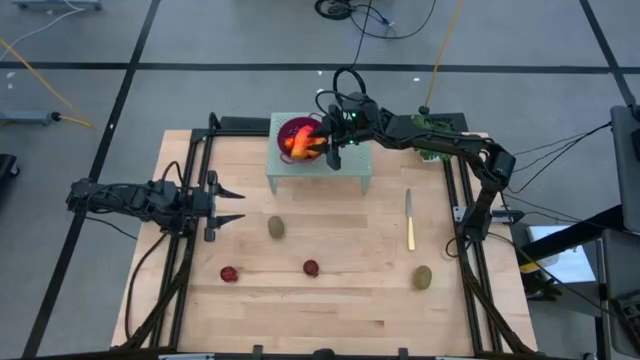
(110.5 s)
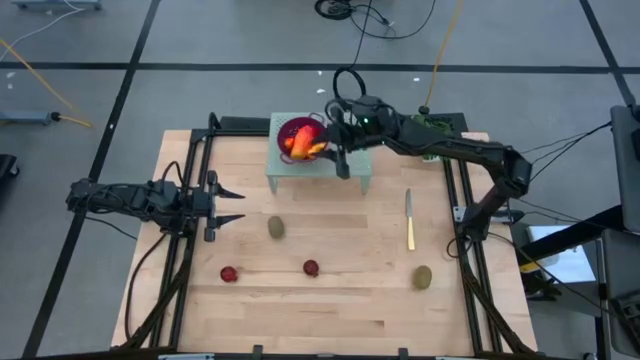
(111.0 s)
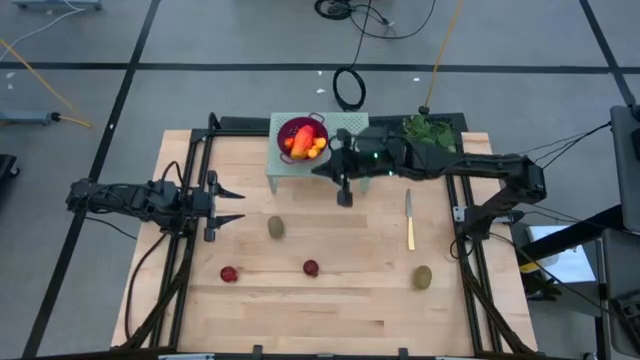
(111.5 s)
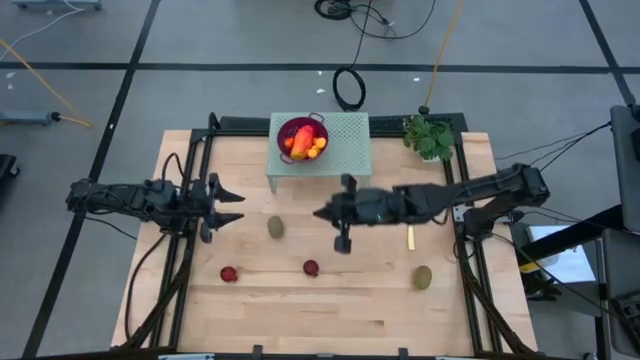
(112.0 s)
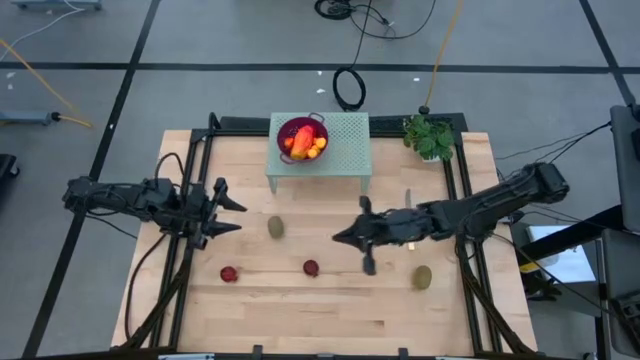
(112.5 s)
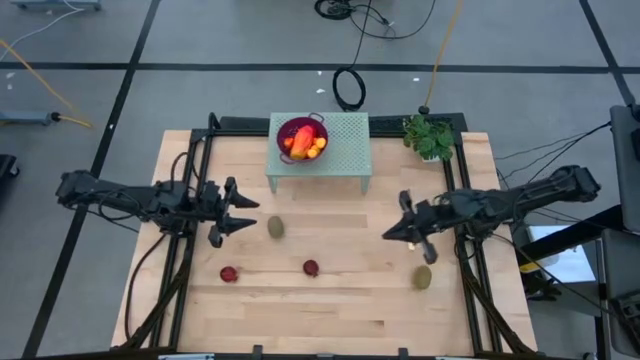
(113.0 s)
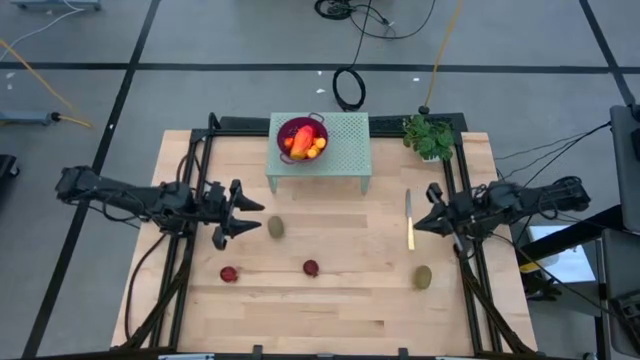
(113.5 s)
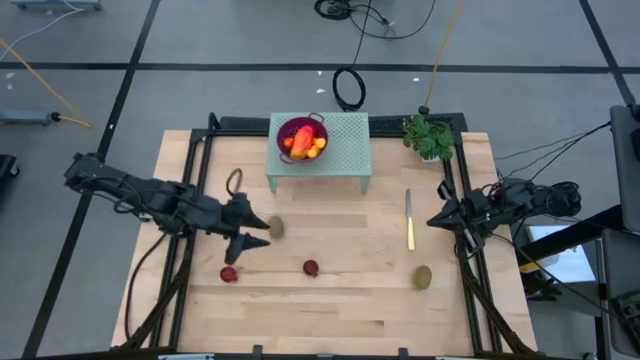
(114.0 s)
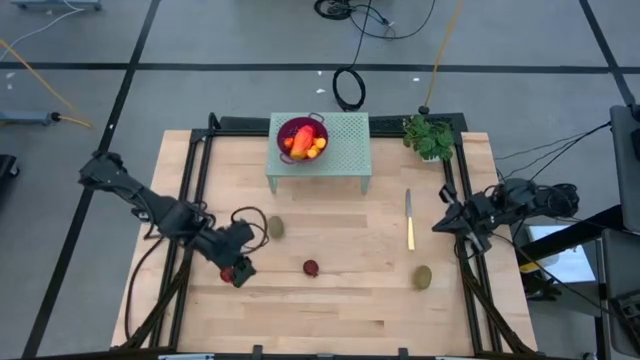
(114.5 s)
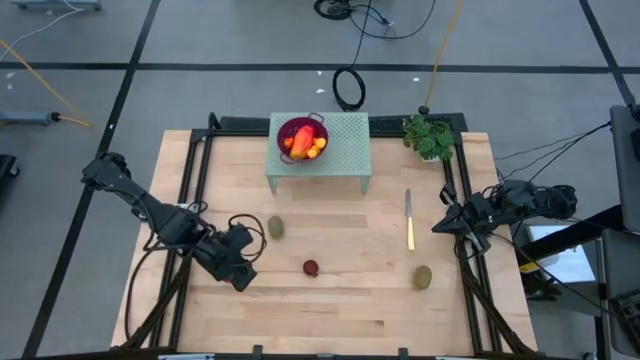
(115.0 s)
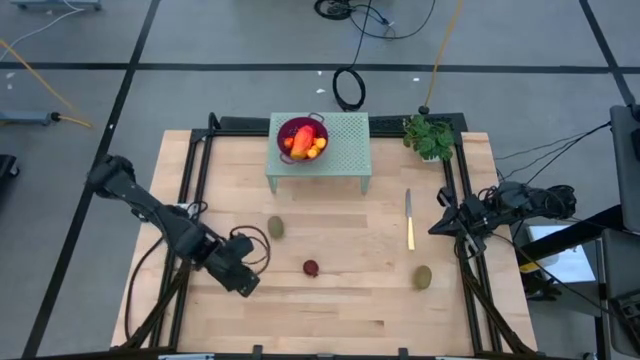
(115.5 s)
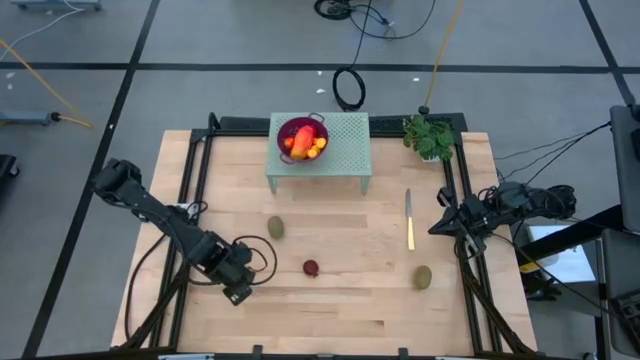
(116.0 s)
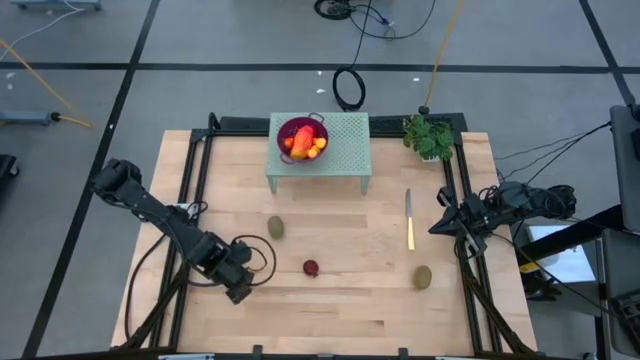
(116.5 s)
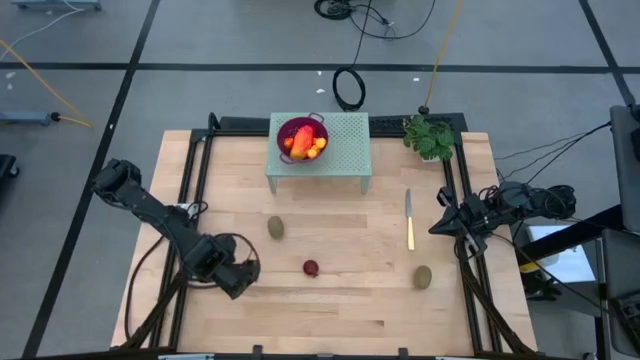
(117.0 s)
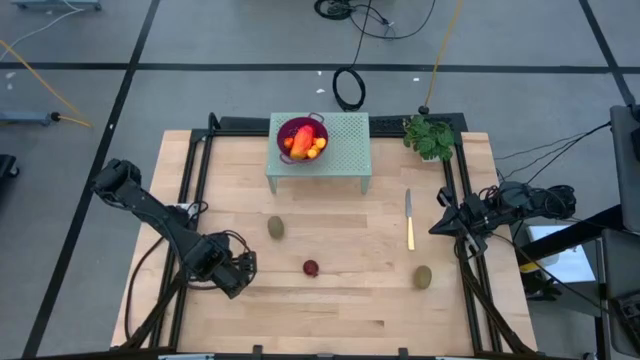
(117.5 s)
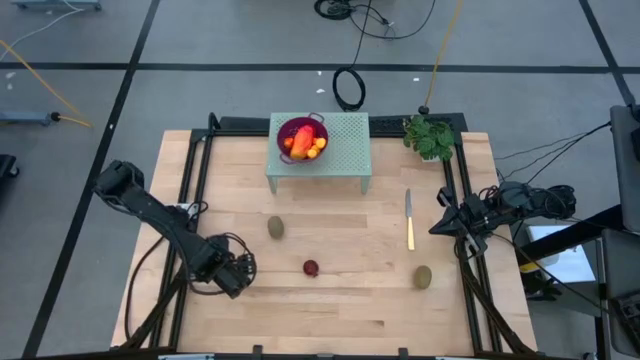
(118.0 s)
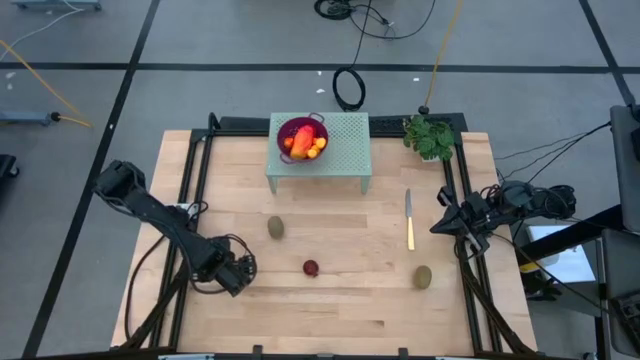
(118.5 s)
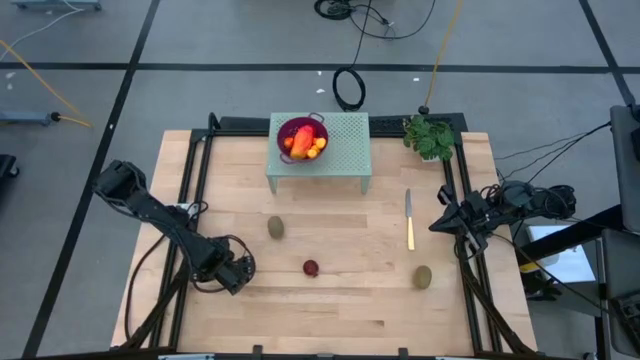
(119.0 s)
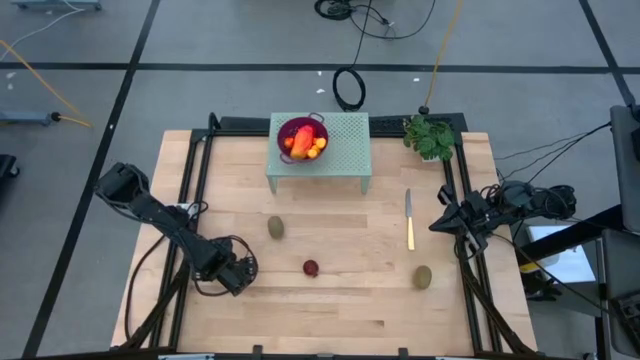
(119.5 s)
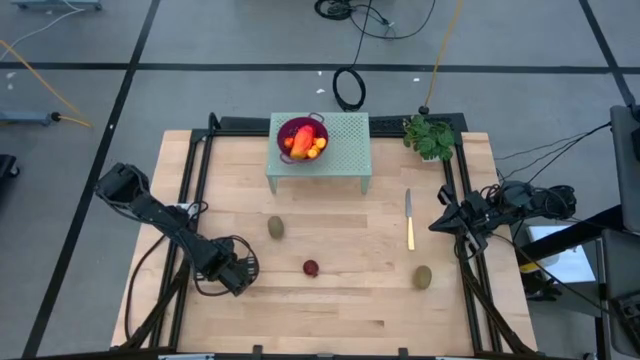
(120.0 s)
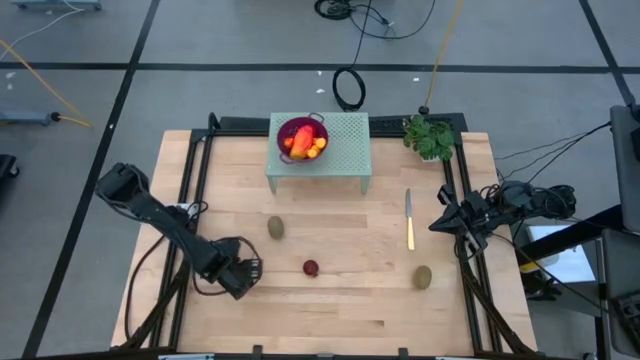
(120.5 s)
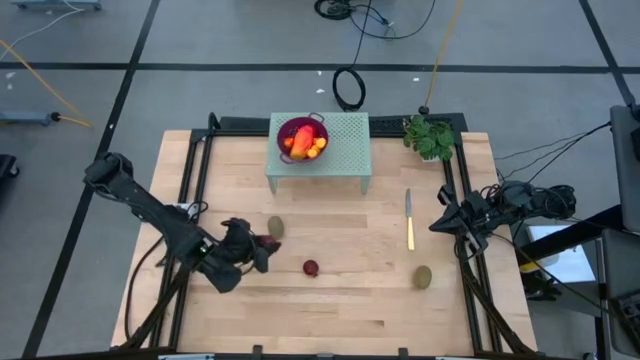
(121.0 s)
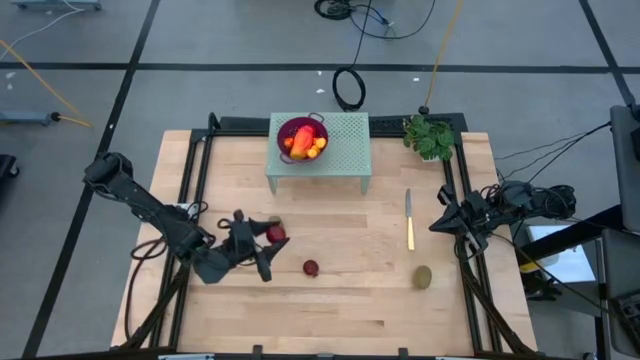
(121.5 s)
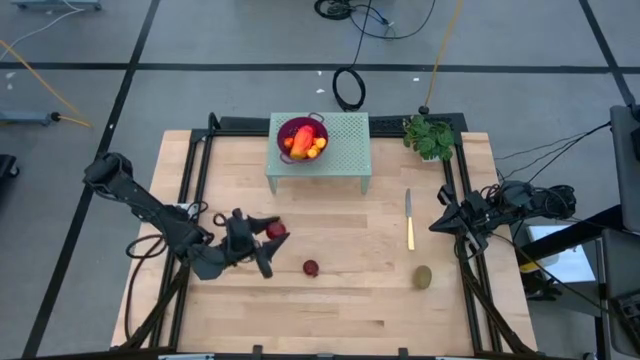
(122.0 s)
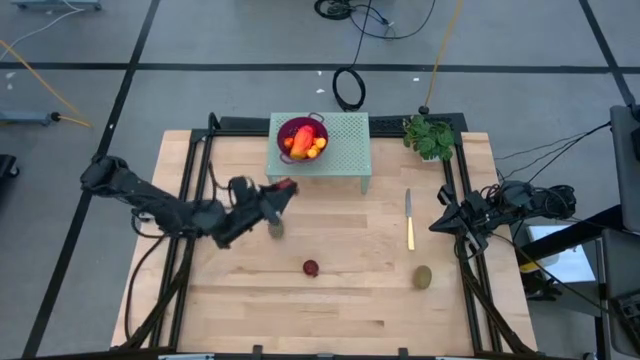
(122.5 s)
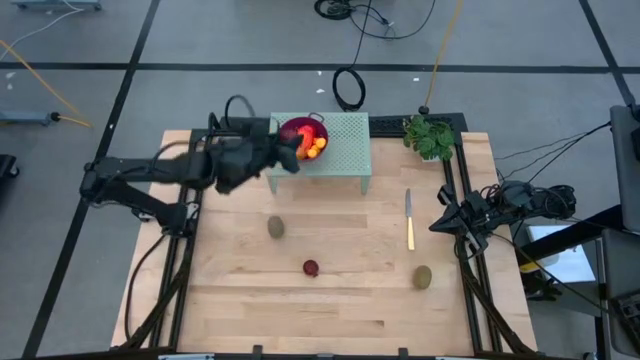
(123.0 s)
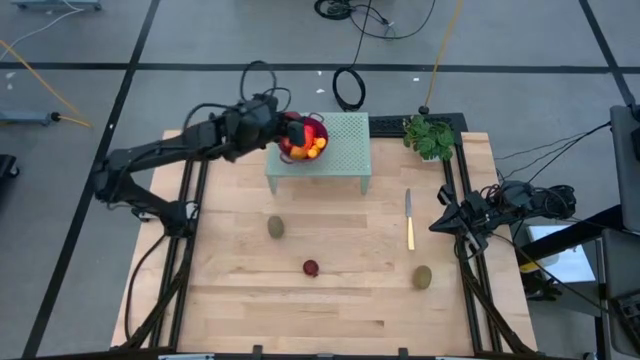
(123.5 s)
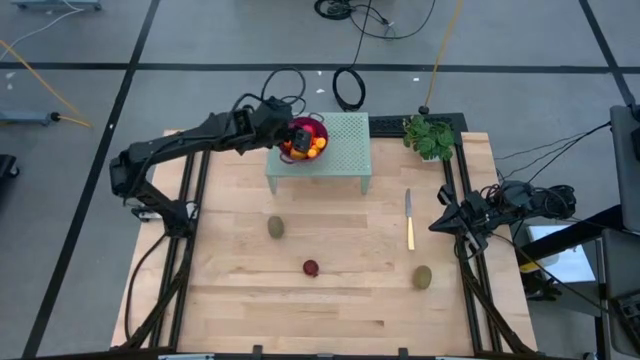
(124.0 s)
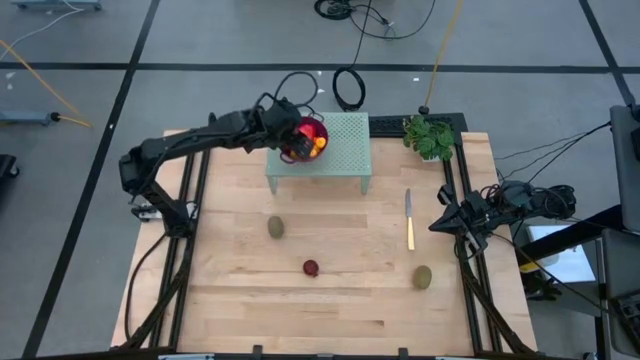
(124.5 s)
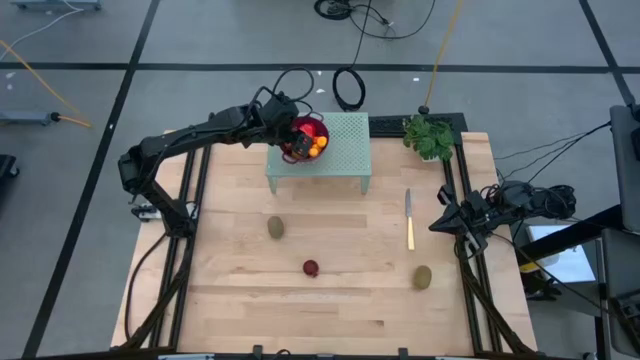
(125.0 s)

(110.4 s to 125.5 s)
Task: Pick & Place Fruit
Put the left pomegranate into the violet strainer bowl on the shelf

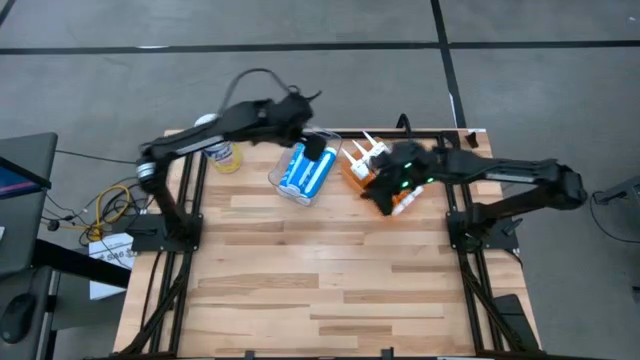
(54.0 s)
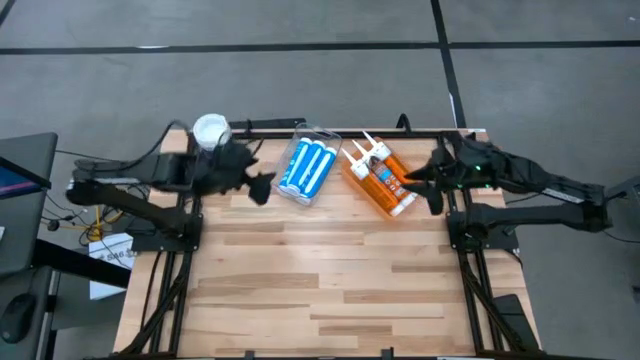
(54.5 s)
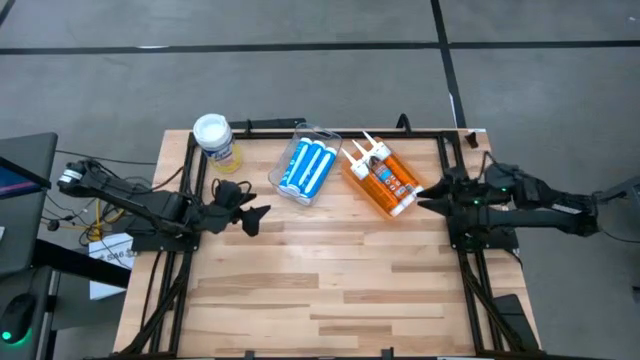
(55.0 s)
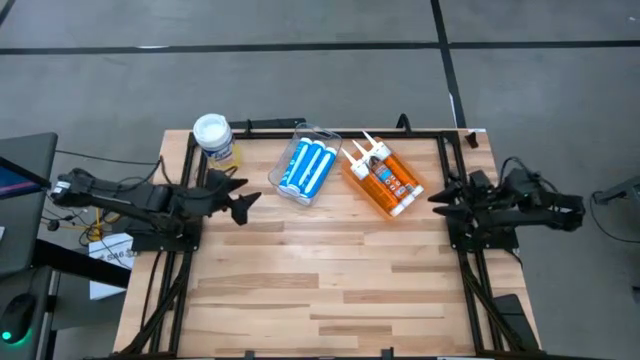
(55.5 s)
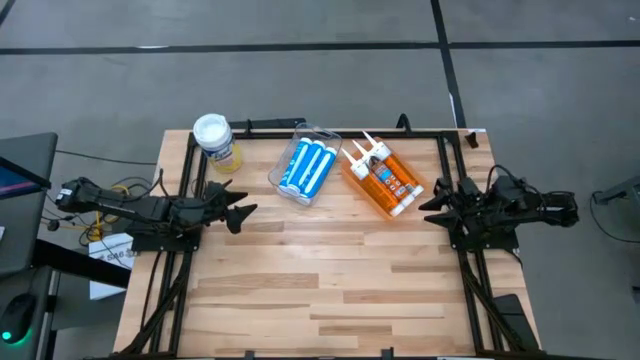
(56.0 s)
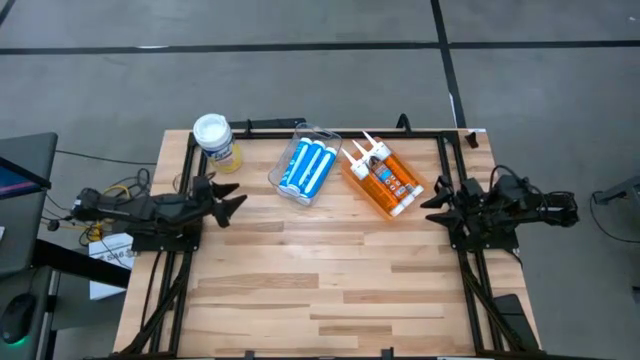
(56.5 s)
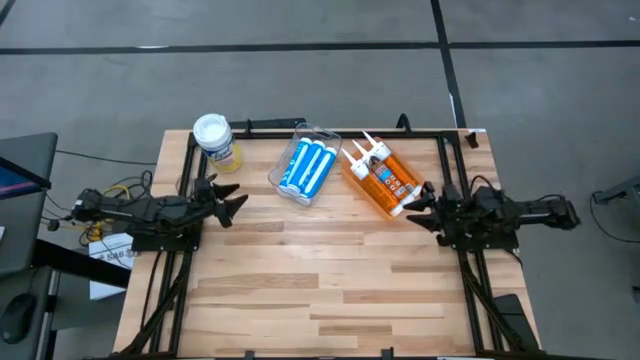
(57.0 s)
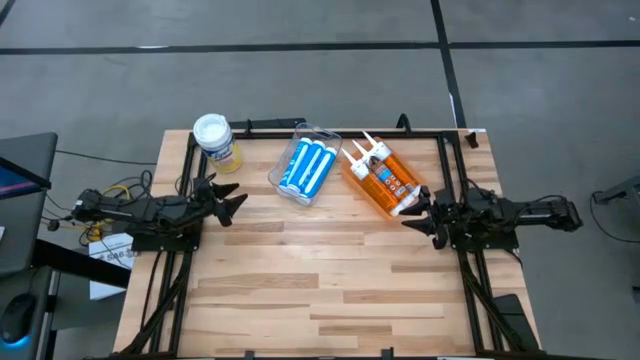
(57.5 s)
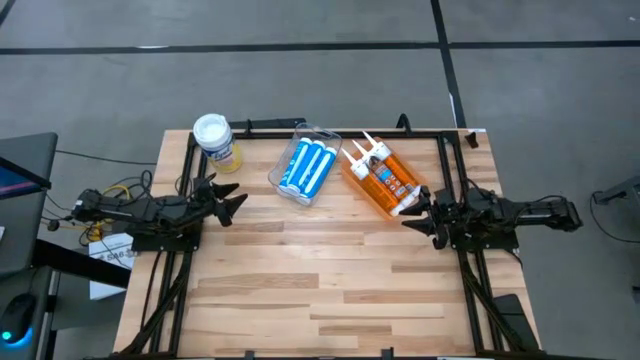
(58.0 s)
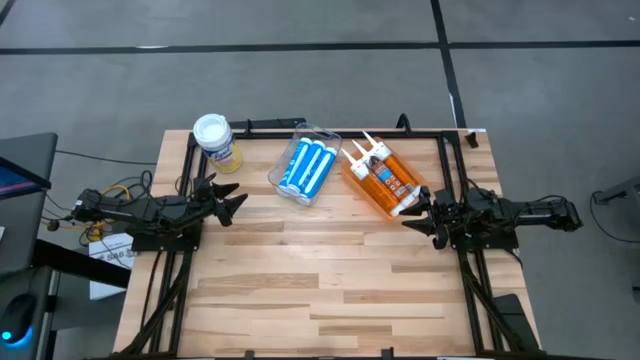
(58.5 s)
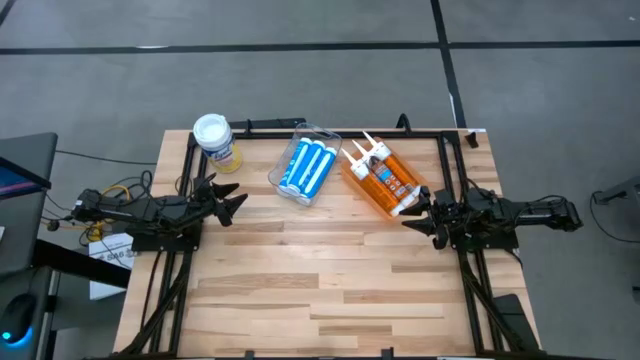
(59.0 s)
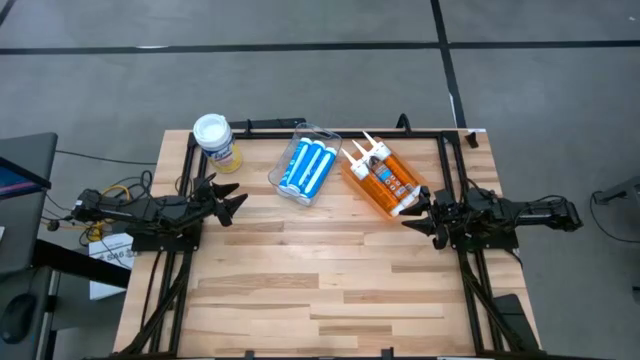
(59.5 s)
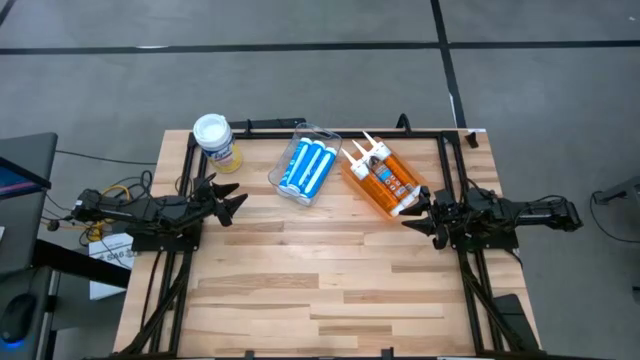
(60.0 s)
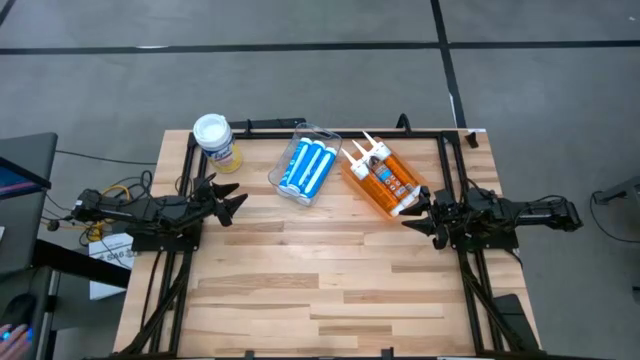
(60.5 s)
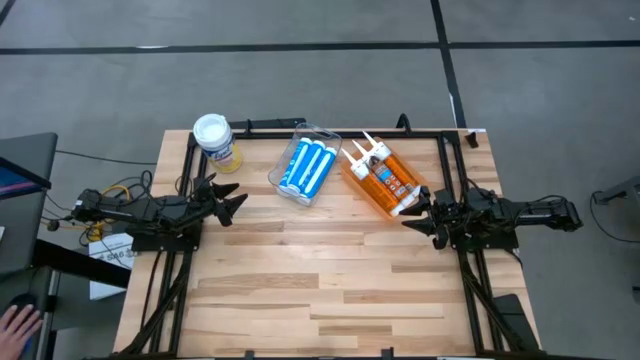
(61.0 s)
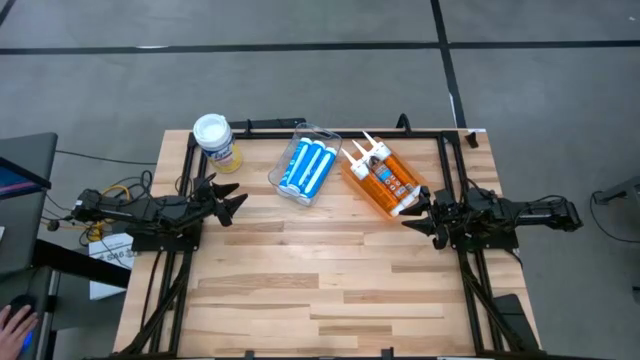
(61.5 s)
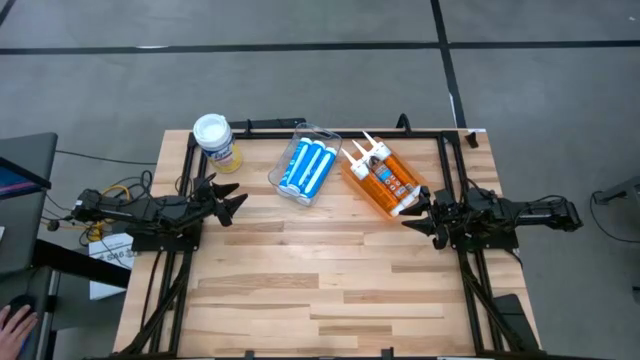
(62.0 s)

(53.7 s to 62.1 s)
Task: Pick & place silicon tubes, Sealant and Lysol wipes
Return to Home Position

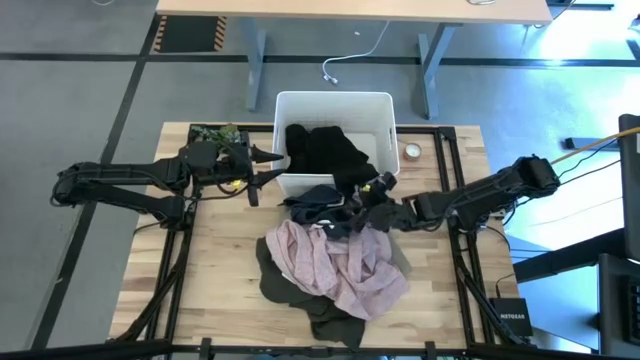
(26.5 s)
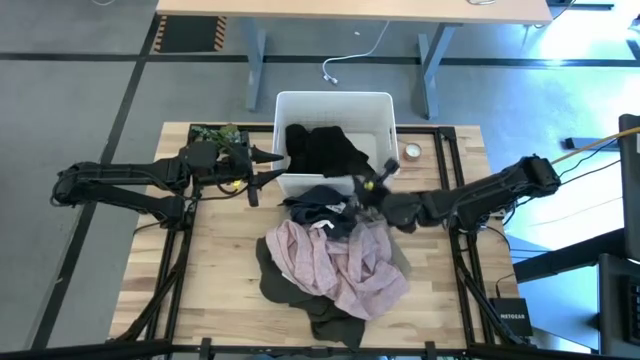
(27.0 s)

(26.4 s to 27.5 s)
Task: Sort clothes
Put the black shirt into the white laundry bin
